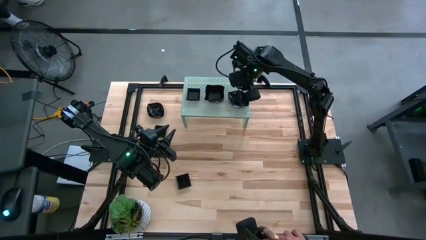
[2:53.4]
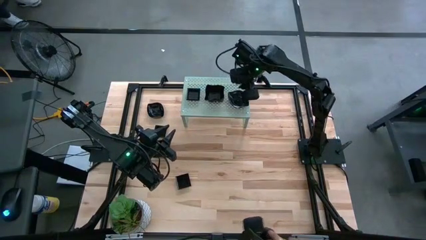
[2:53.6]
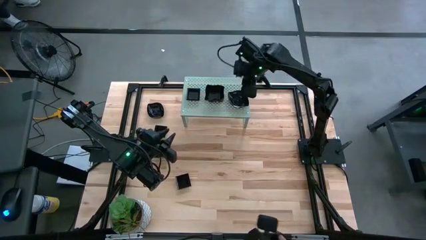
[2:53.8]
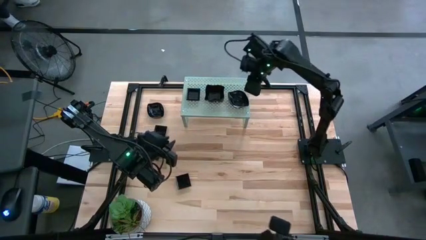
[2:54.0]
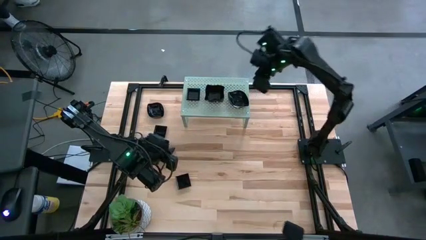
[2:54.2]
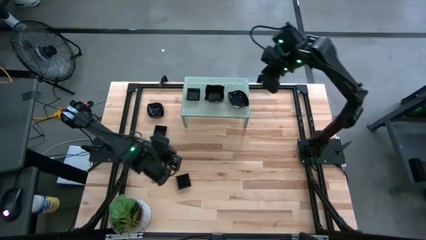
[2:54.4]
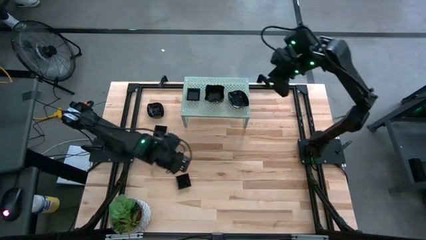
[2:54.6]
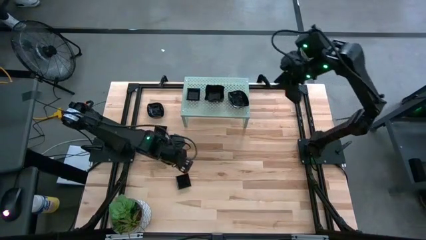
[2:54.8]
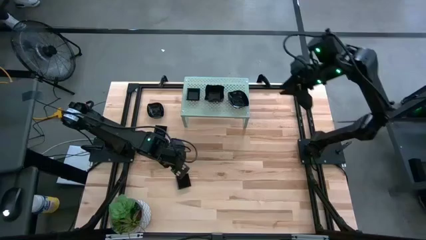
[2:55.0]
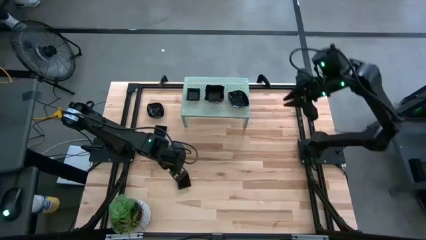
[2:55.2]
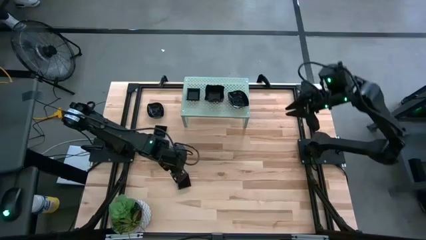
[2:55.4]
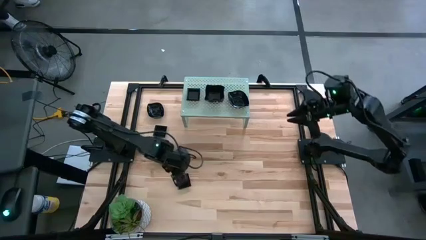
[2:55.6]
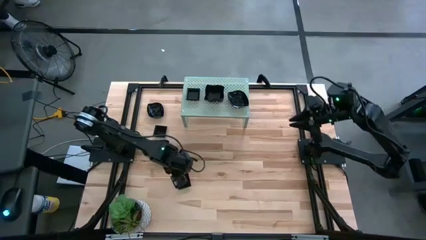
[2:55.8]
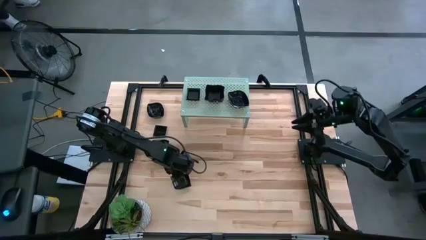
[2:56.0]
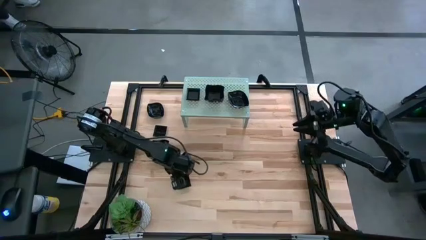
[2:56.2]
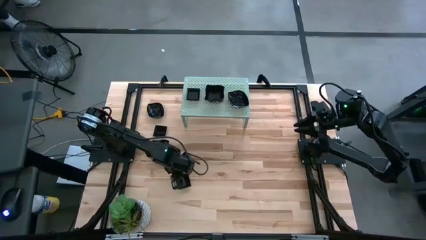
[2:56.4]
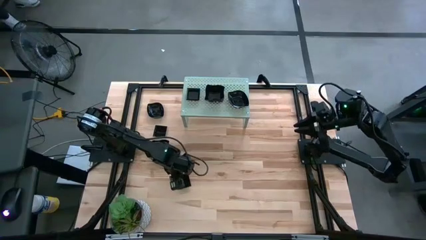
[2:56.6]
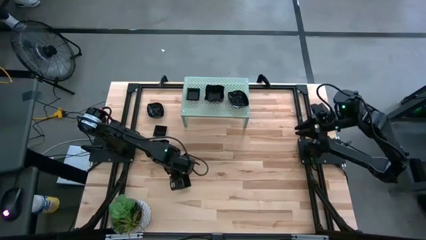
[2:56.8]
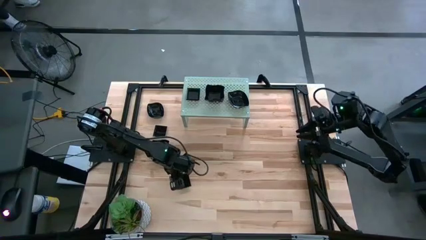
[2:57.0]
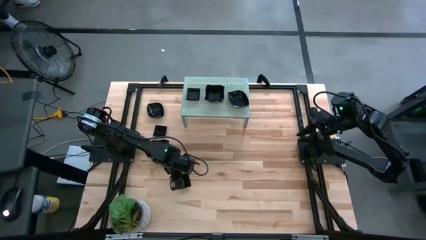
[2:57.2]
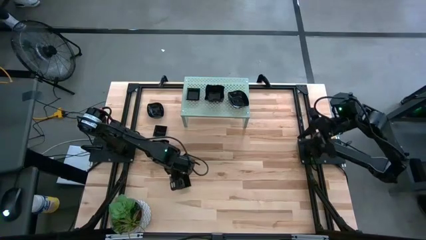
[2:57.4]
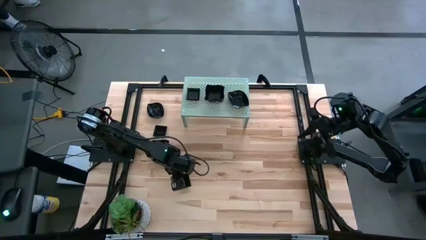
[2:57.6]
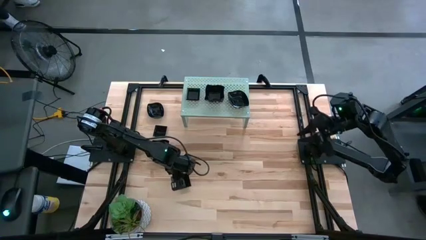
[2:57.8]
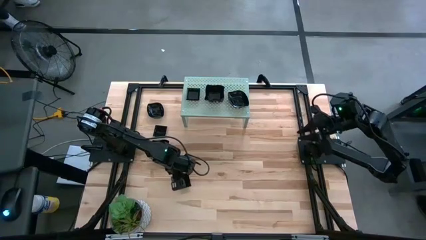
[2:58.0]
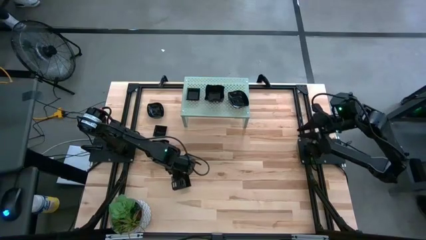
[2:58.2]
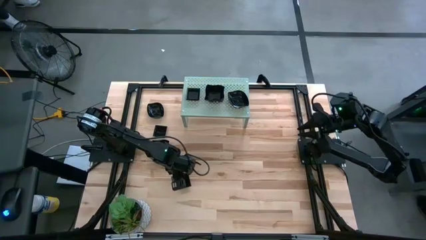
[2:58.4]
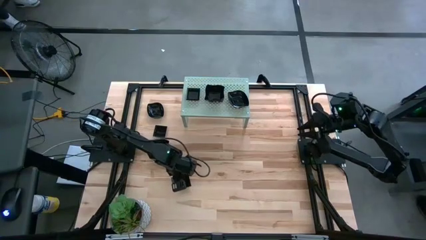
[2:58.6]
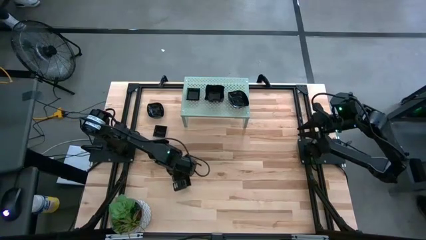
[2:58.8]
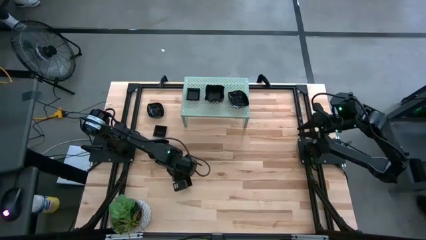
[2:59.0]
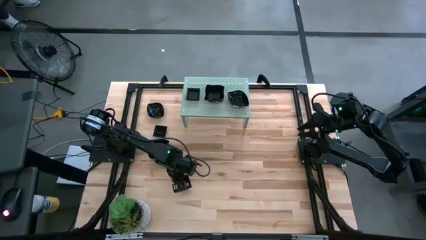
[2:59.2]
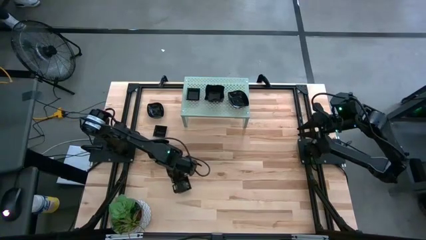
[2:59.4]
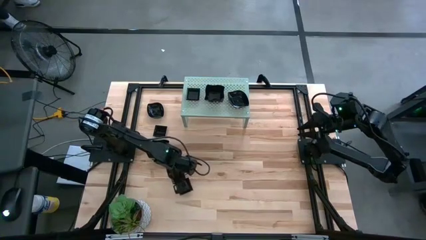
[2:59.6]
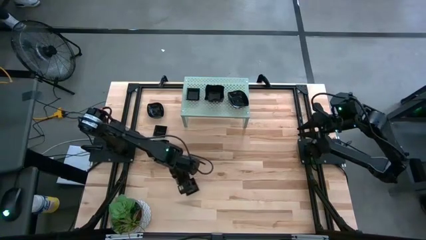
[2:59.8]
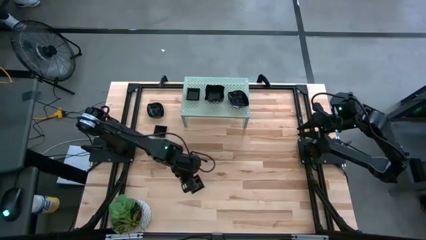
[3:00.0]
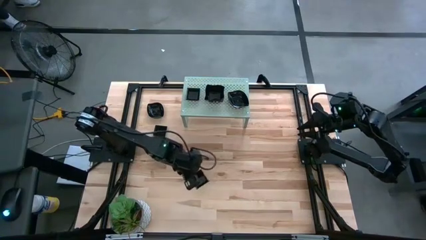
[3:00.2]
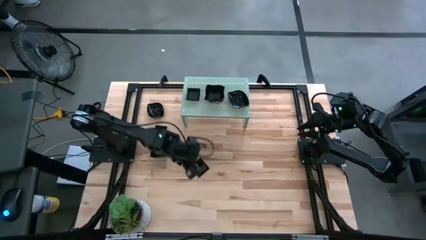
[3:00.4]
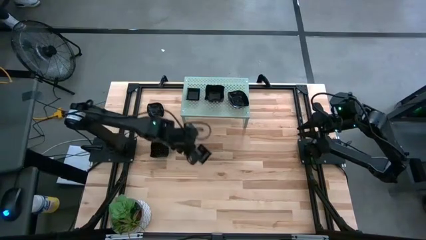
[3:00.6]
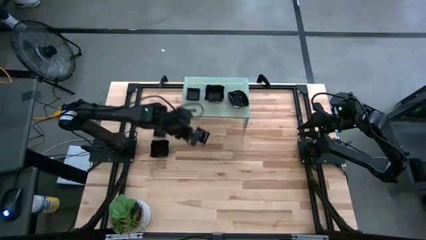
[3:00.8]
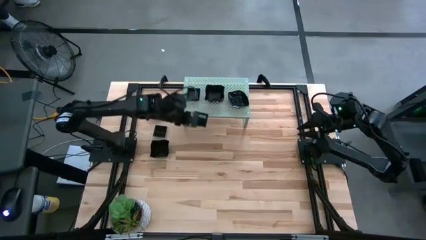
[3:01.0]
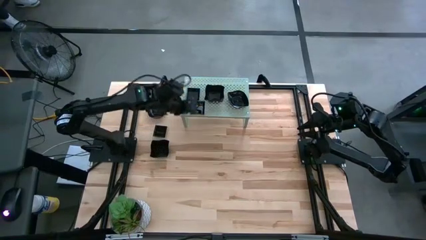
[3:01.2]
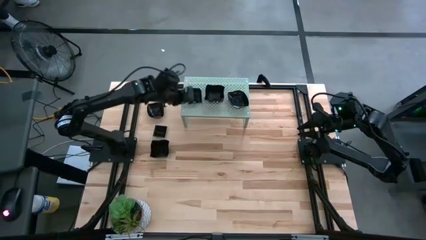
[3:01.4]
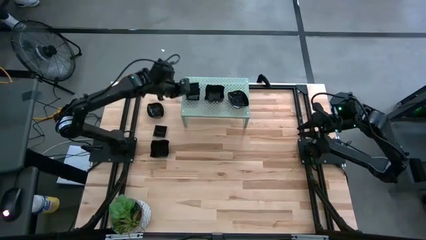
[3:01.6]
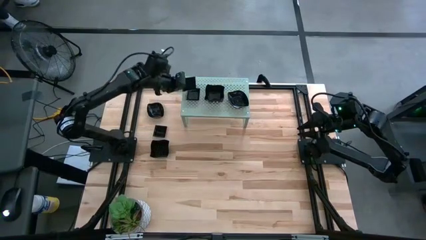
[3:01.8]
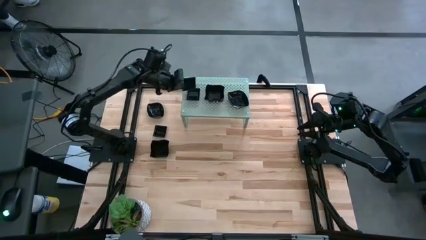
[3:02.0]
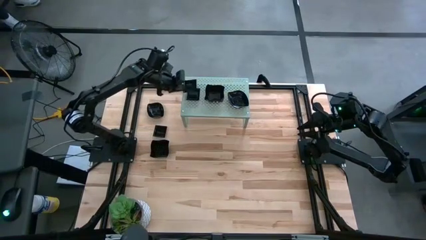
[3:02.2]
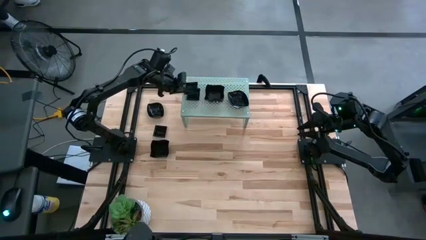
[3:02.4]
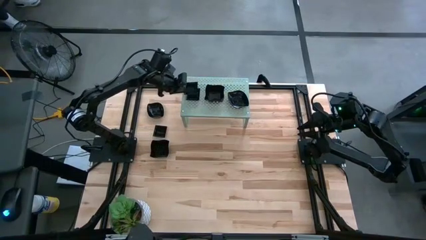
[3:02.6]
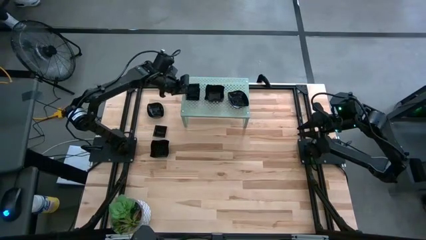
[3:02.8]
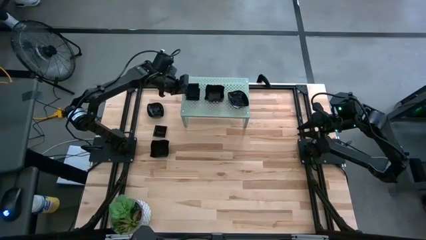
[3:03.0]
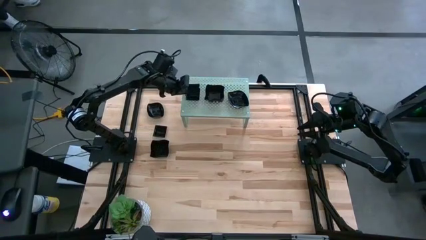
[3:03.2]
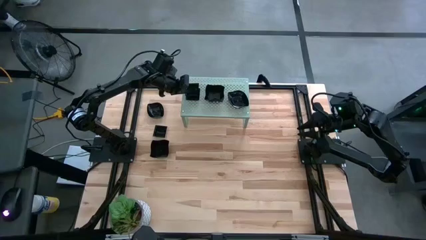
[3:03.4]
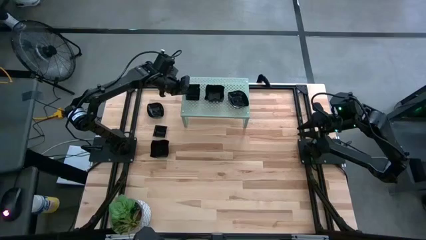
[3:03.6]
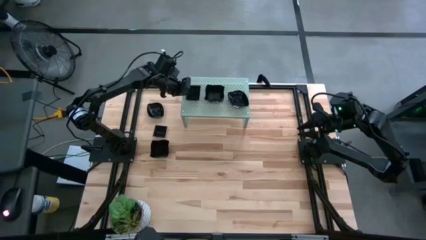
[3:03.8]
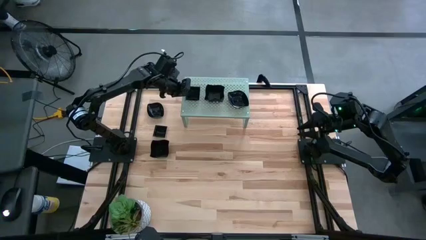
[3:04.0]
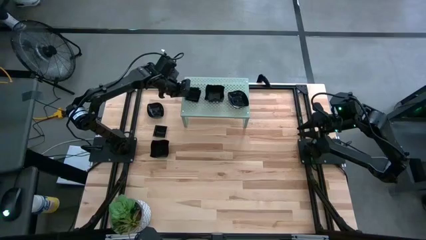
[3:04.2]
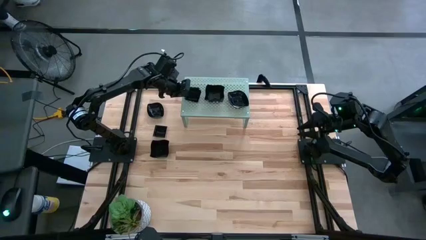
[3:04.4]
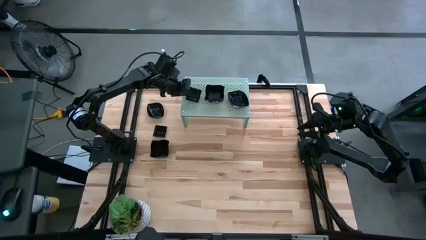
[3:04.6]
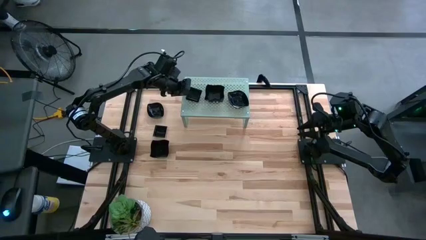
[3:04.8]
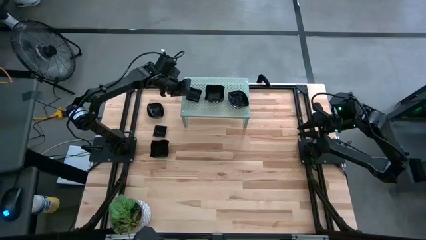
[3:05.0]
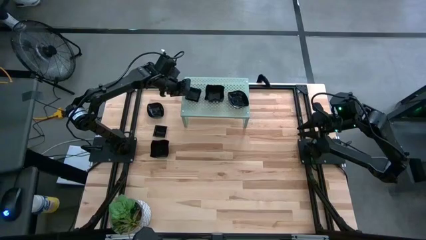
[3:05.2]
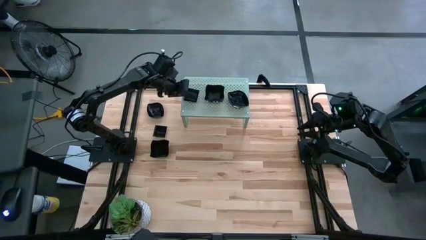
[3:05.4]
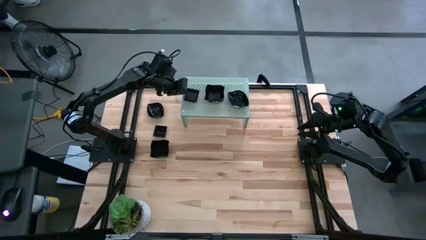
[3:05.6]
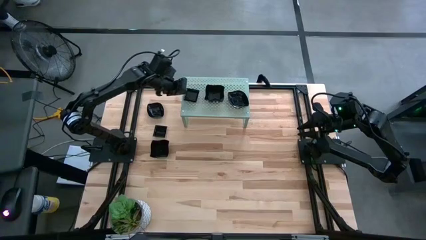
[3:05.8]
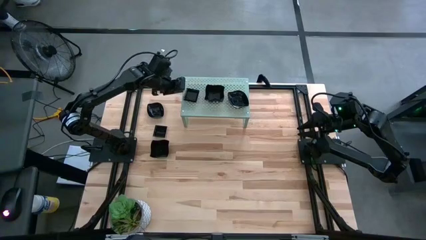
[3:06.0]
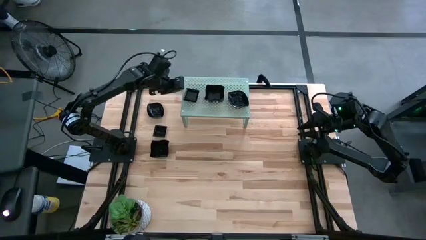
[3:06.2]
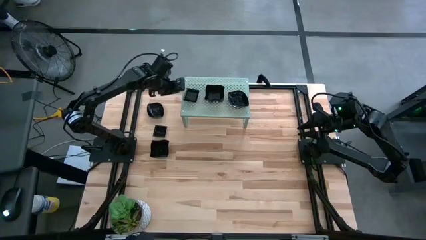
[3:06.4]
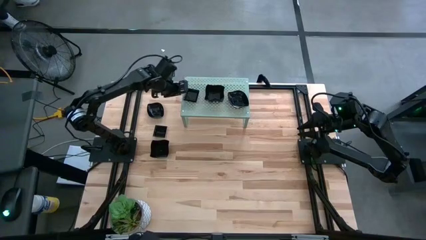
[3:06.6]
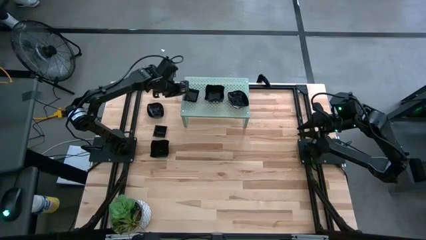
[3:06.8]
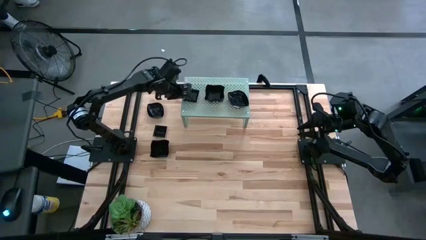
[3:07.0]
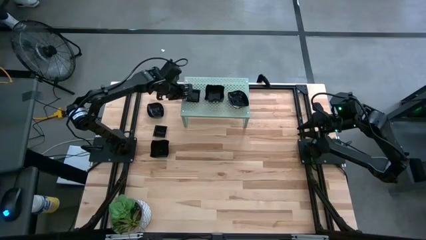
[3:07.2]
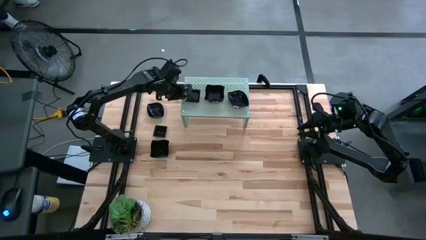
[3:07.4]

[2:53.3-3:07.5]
Task: Pick & Place Mini shaped plates
Stack the square shaped plate on top of the square shaped plate on the shelf
